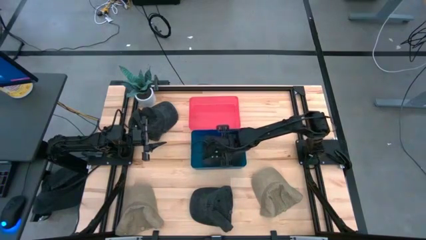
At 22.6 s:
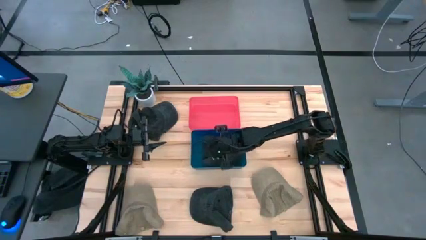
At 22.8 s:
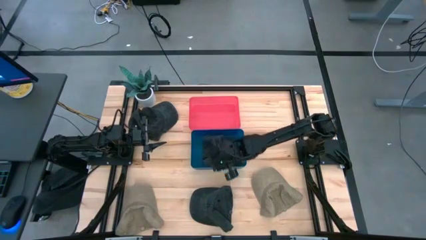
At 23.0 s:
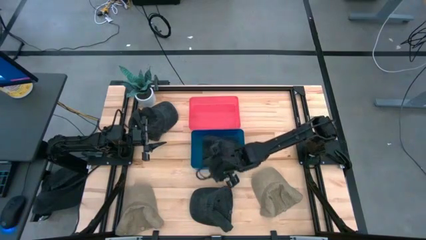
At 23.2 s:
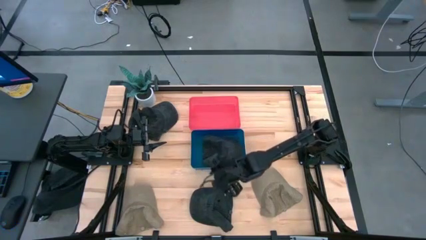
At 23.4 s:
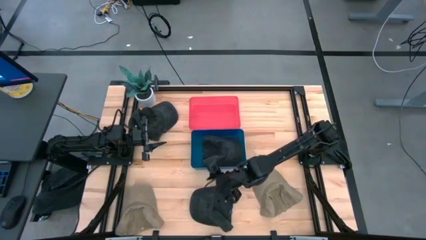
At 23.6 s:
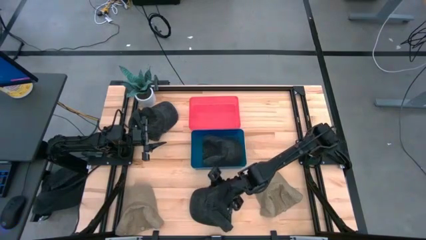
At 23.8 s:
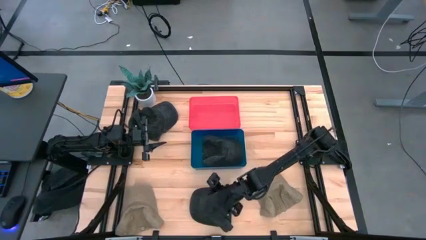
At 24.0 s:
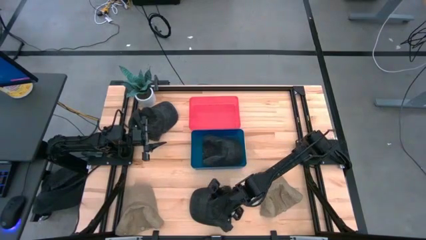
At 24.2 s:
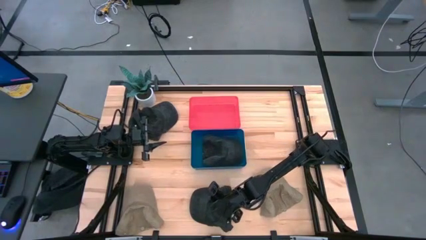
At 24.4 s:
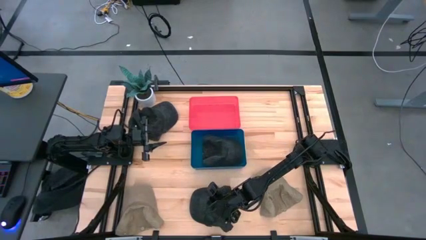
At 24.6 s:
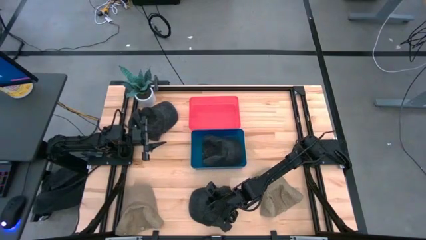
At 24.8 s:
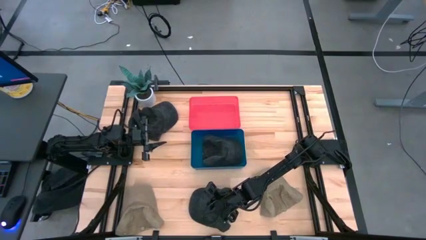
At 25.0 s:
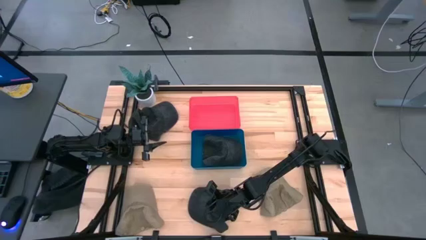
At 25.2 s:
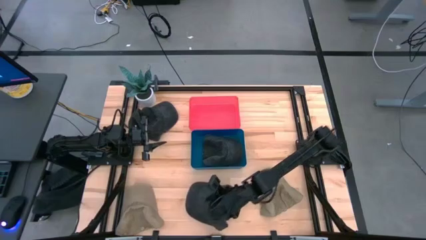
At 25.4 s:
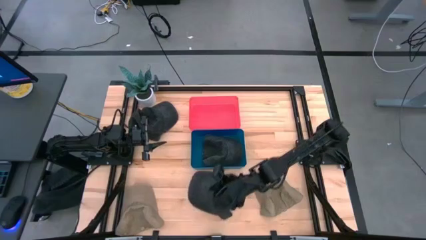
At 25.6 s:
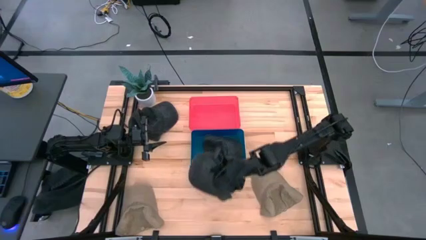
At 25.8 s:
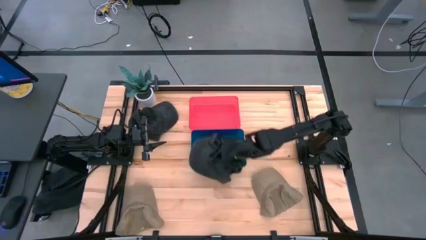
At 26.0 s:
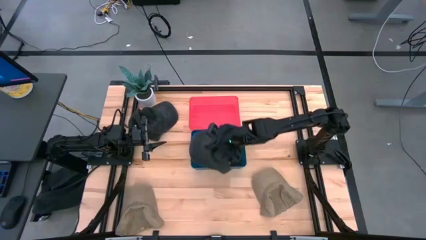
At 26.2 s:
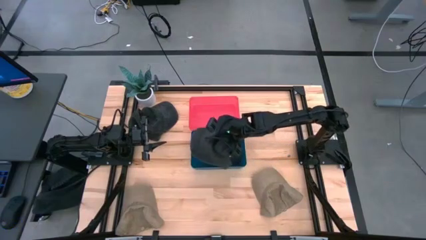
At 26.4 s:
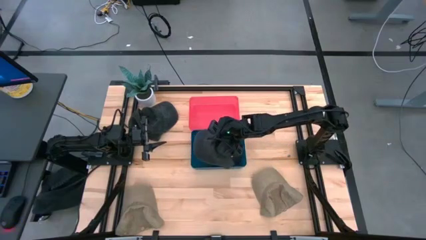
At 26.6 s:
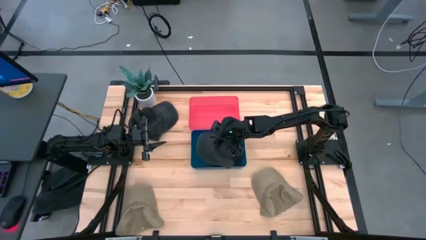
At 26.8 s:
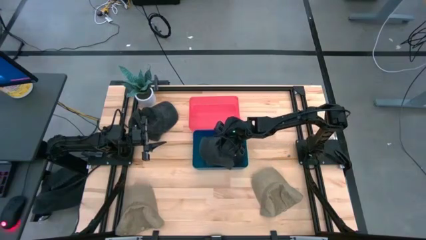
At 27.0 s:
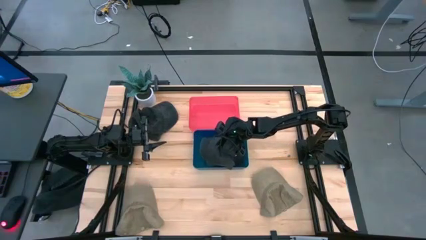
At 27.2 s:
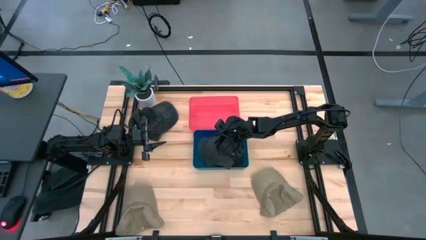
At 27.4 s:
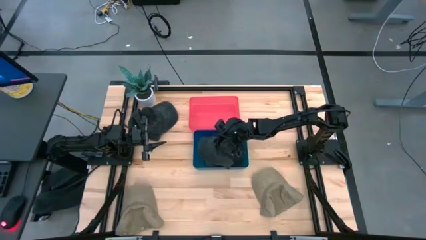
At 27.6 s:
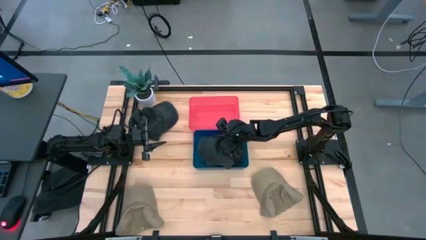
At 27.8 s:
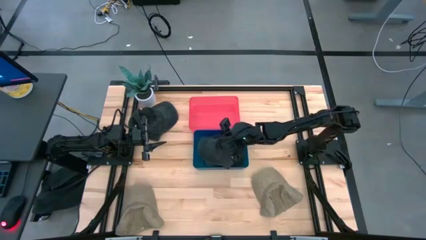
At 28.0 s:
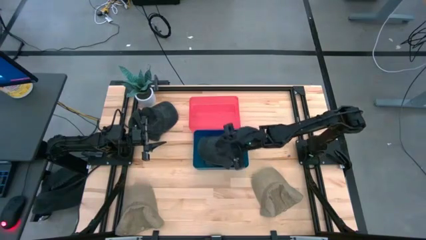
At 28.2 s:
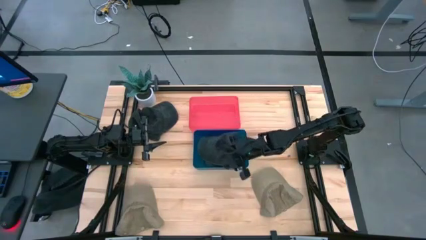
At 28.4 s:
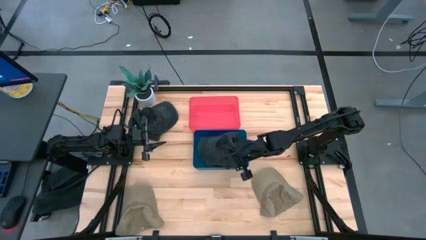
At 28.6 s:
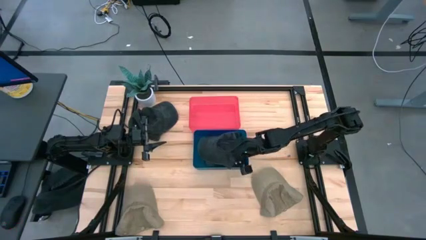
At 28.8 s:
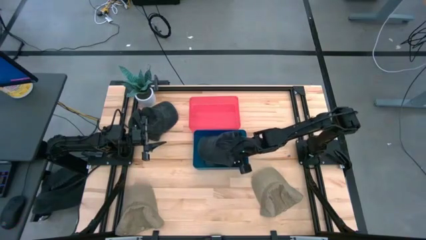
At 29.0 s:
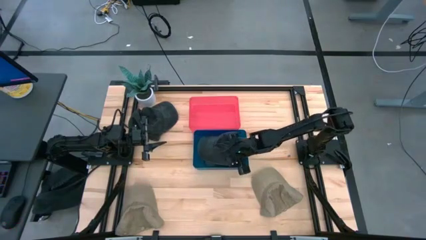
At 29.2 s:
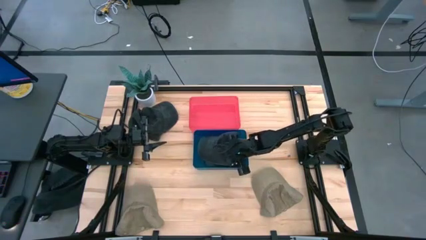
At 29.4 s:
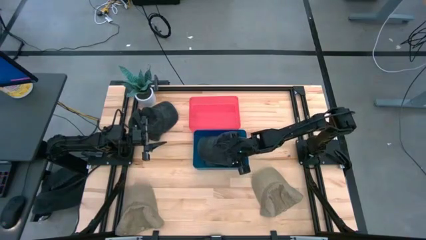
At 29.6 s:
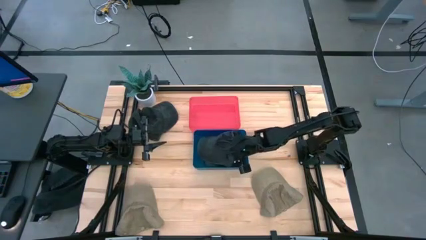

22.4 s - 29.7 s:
Task: Pick & Place hat
Put the bottom black cap into the blue bin

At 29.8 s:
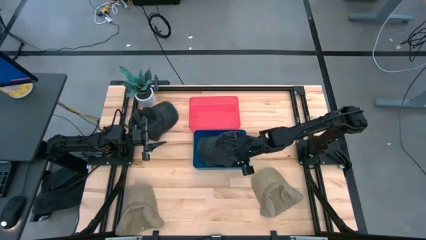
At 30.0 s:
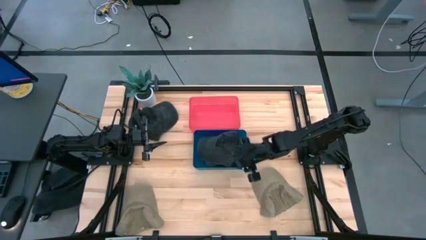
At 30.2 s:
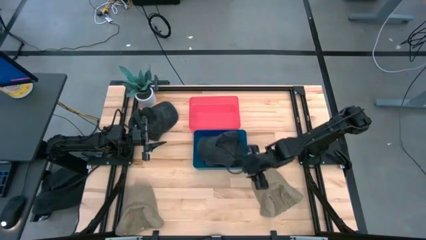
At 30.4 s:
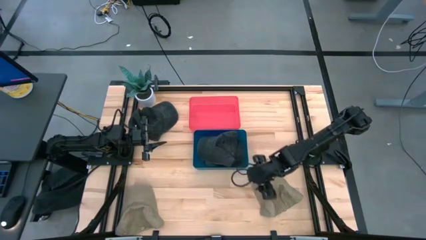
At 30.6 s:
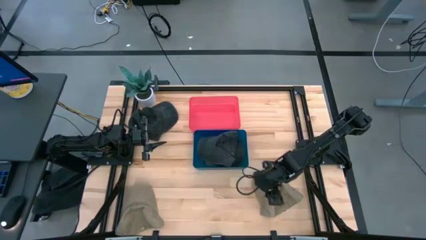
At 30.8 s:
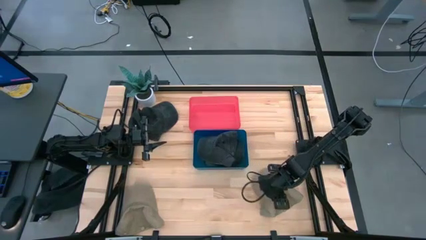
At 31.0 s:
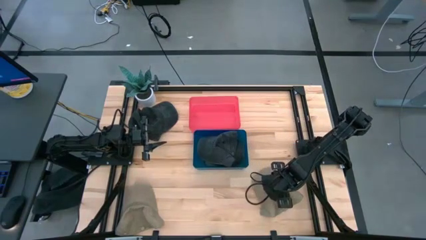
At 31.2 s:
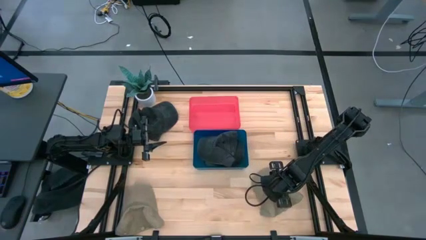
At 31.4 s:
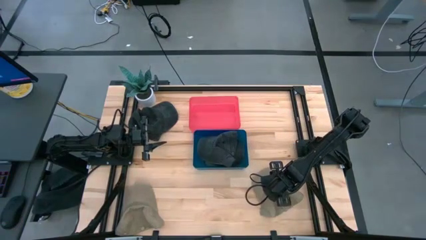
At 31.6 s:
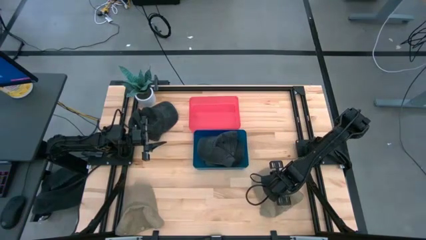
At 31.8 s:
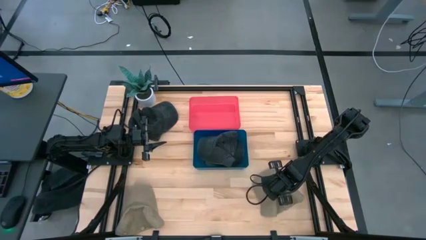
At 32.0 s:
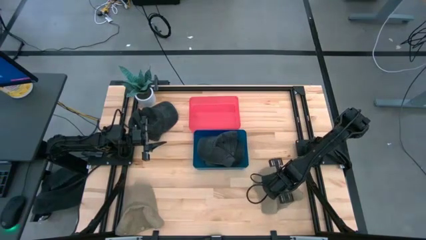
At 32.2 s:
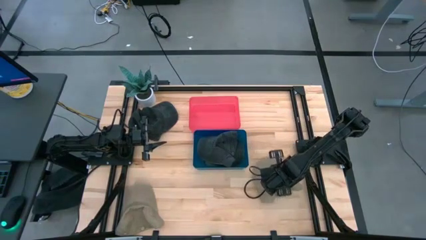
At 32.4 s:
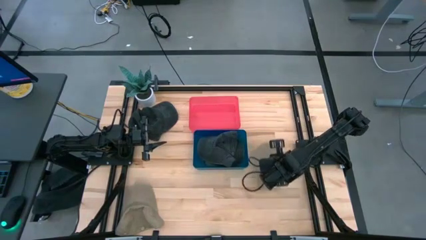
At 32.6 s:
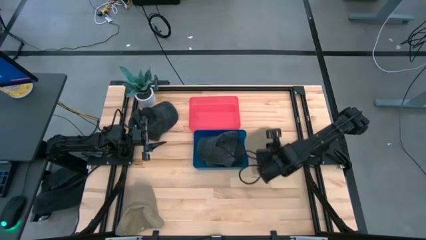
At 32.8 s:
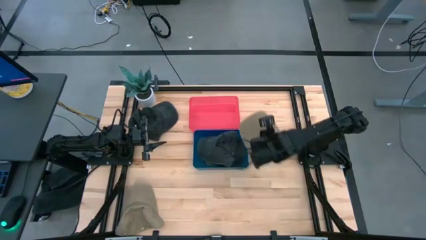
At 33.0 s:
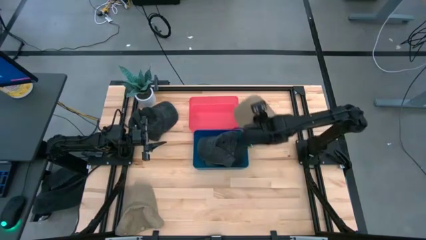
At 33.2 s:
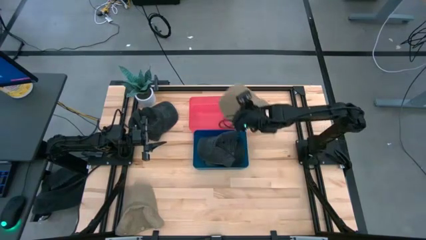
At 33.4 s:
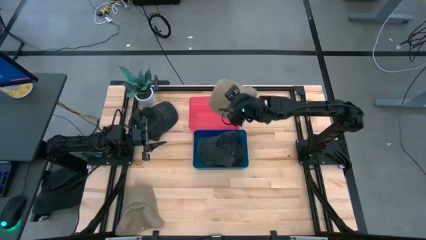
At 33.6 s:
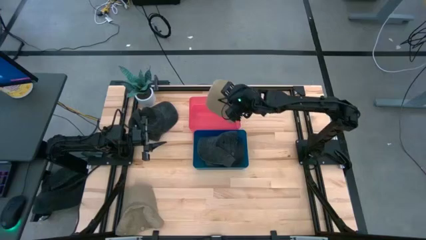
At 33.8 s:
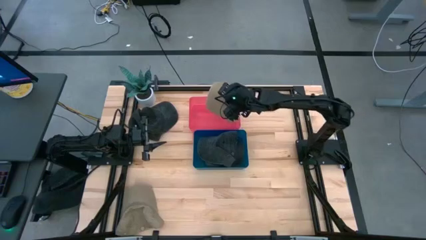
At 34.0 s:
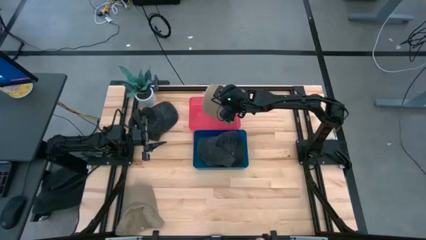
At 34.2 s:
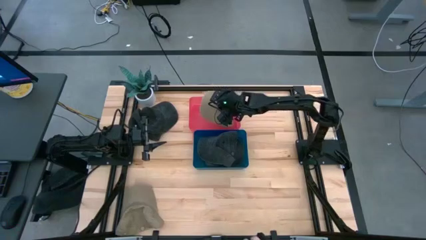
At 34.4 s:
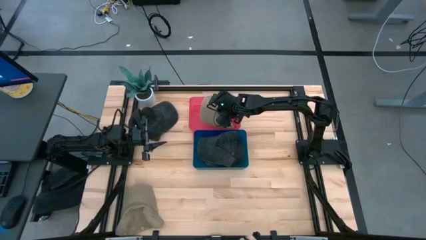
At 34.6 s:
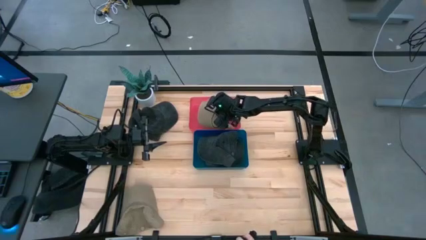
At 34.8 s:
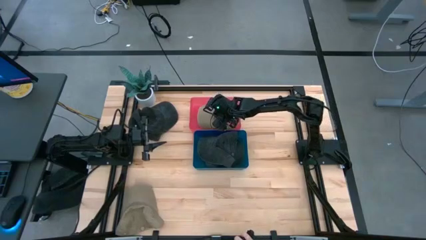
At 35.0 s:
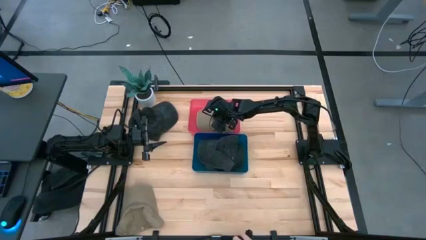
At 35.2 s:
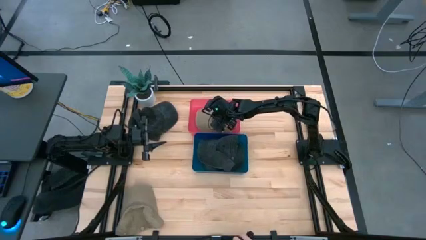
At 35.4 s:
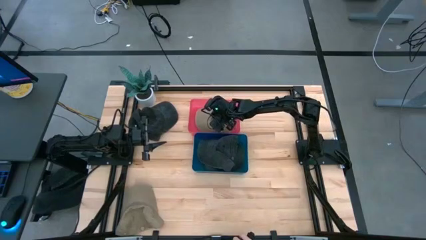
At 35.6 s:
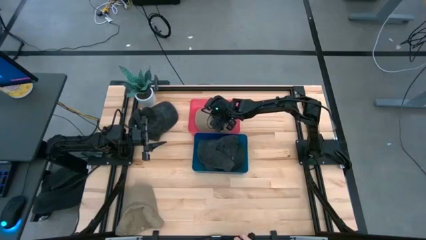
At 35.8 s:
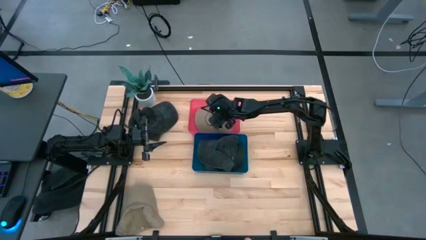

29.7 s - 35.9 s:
Put the right brown cap into the red bin
